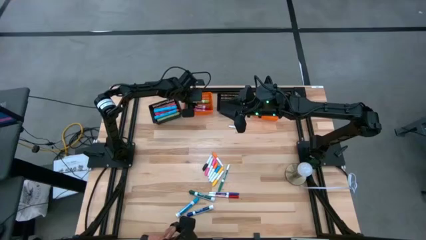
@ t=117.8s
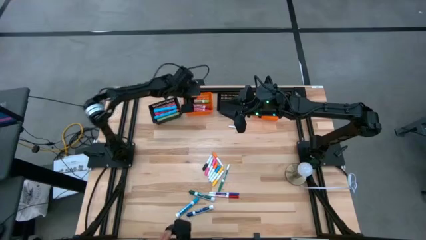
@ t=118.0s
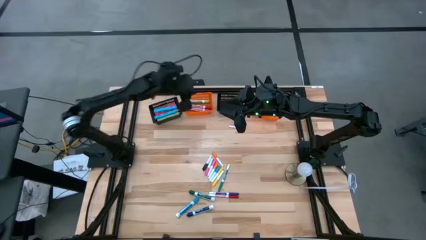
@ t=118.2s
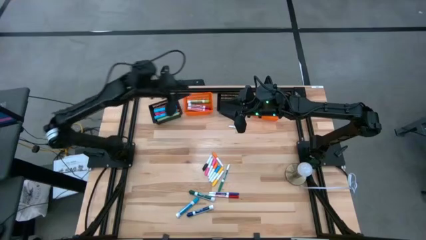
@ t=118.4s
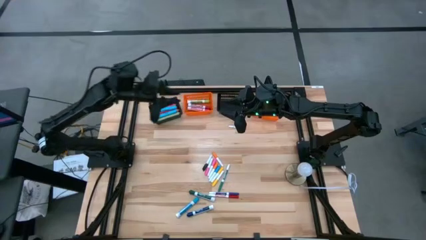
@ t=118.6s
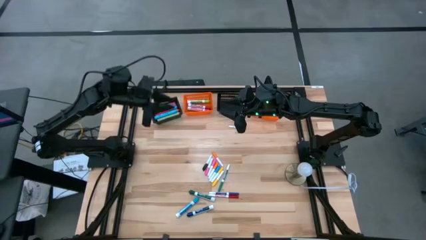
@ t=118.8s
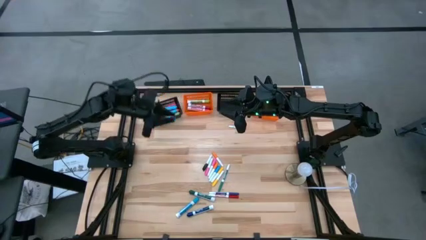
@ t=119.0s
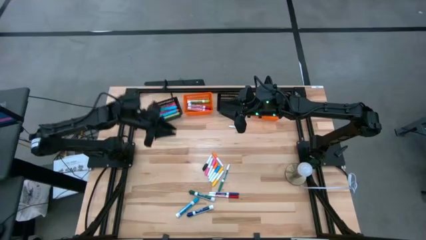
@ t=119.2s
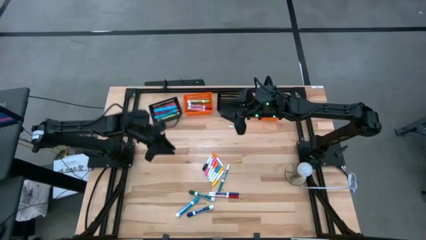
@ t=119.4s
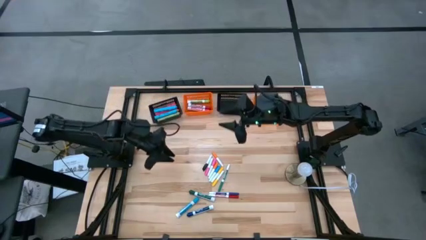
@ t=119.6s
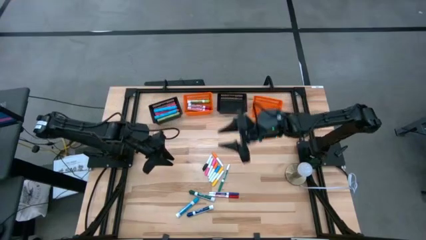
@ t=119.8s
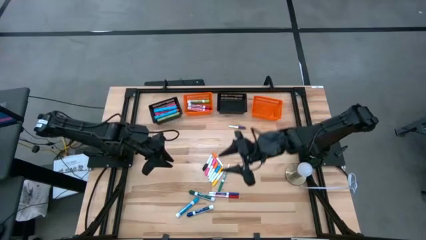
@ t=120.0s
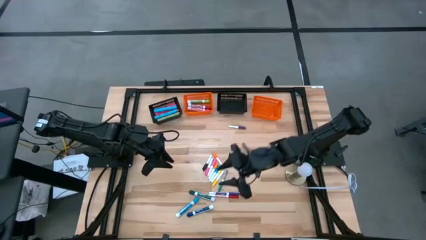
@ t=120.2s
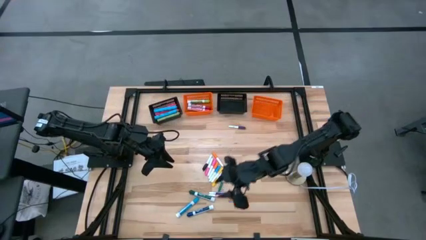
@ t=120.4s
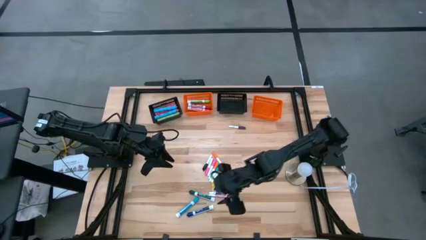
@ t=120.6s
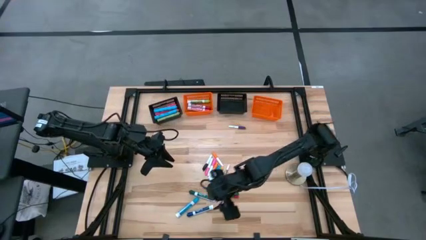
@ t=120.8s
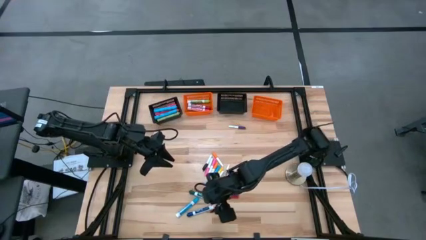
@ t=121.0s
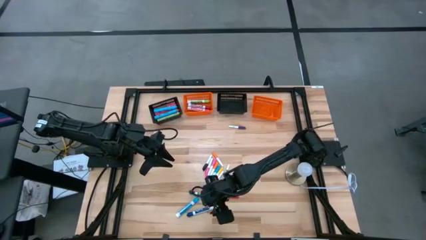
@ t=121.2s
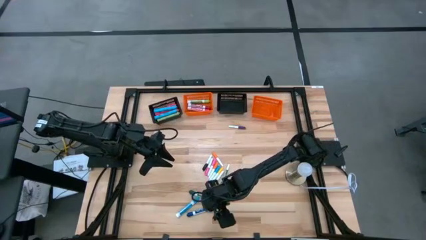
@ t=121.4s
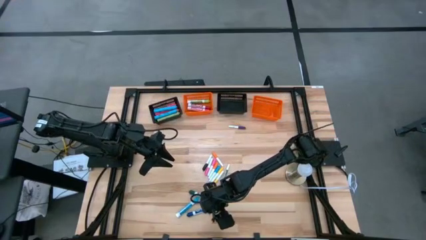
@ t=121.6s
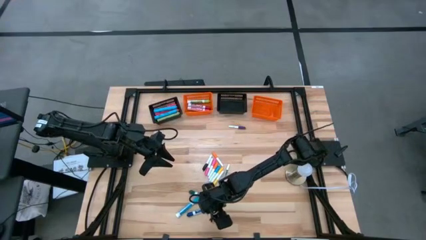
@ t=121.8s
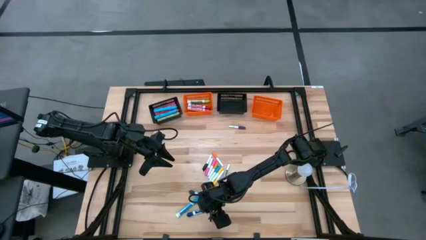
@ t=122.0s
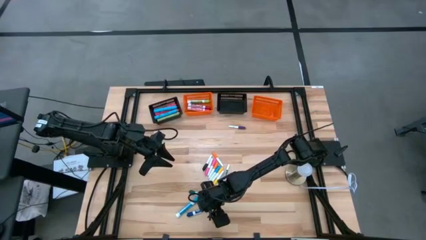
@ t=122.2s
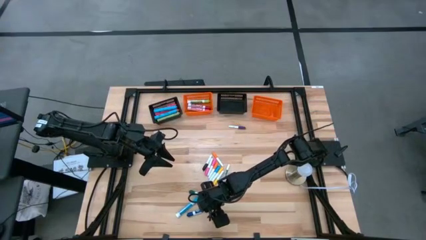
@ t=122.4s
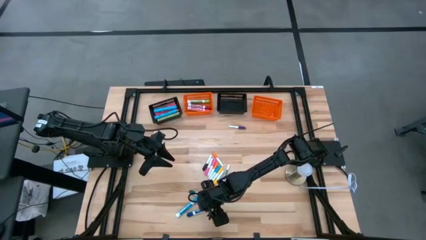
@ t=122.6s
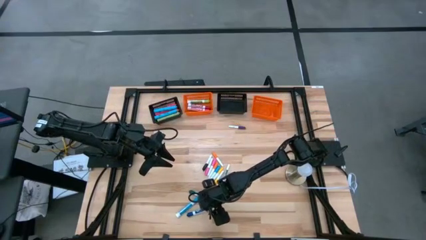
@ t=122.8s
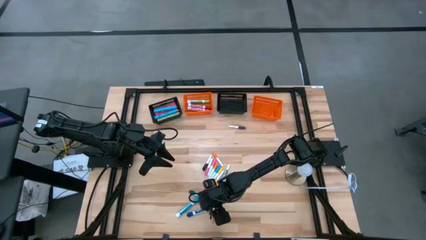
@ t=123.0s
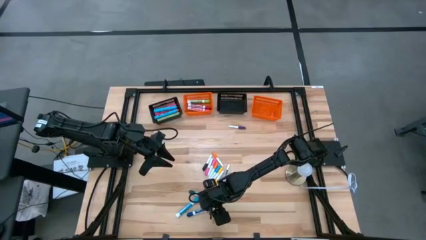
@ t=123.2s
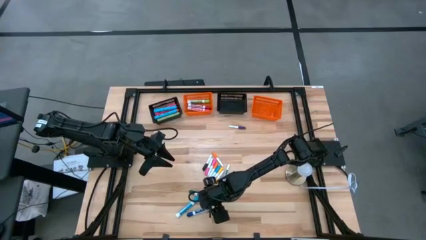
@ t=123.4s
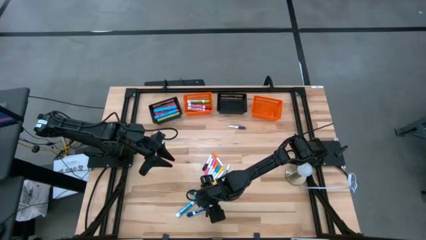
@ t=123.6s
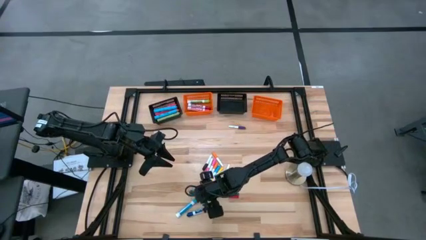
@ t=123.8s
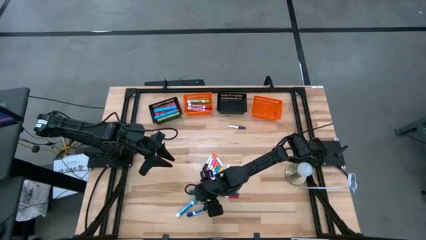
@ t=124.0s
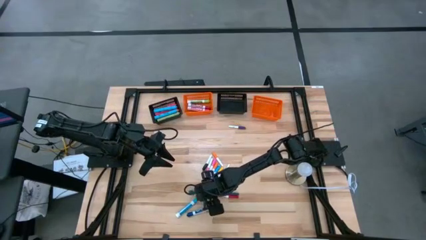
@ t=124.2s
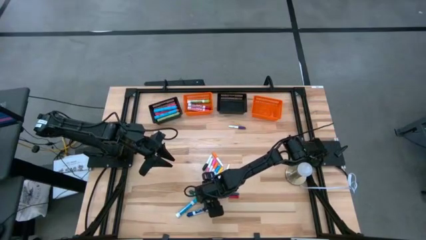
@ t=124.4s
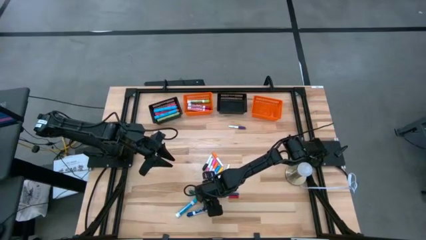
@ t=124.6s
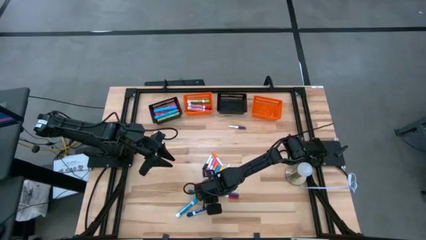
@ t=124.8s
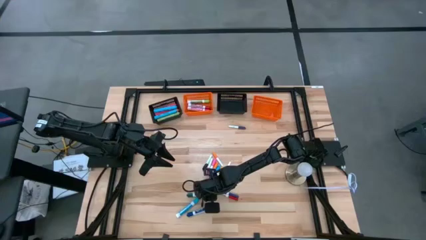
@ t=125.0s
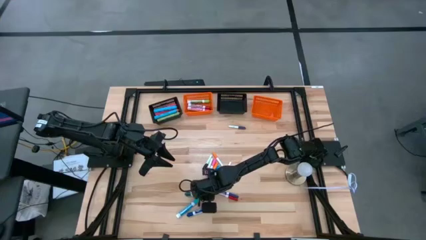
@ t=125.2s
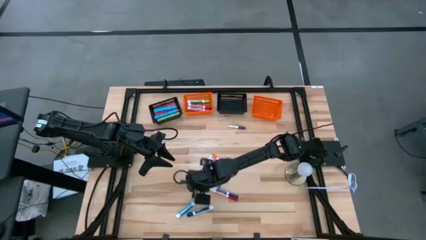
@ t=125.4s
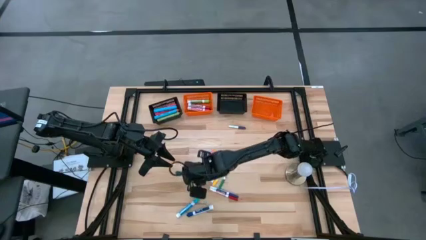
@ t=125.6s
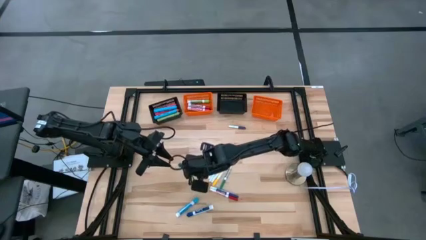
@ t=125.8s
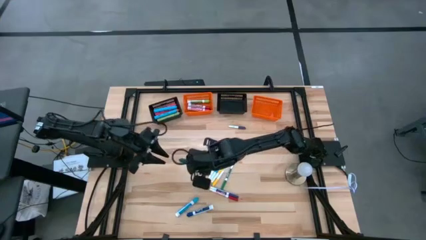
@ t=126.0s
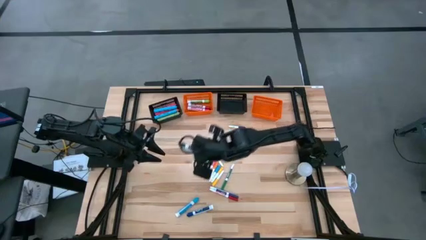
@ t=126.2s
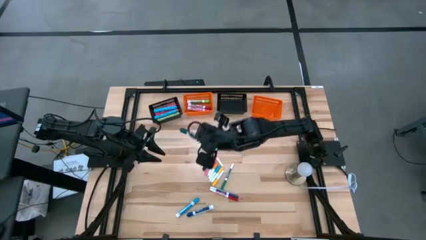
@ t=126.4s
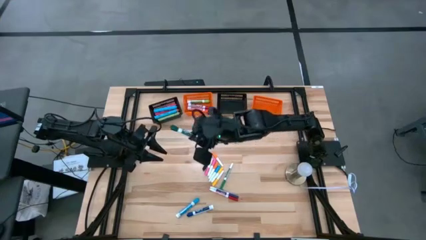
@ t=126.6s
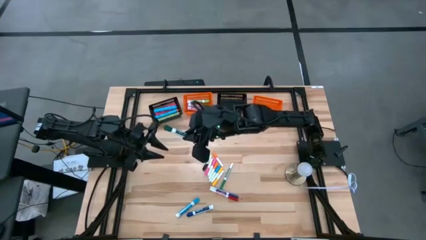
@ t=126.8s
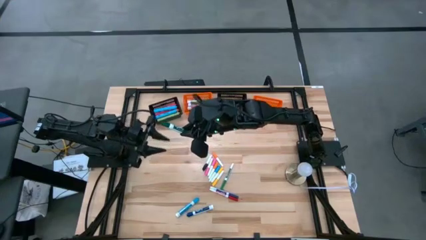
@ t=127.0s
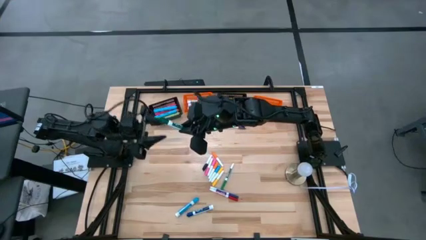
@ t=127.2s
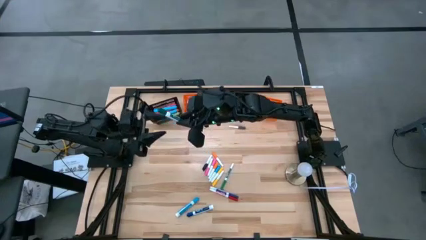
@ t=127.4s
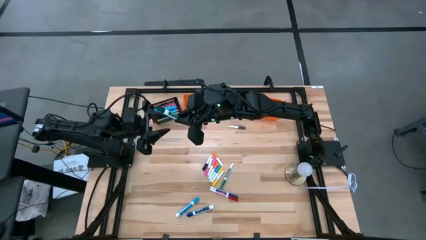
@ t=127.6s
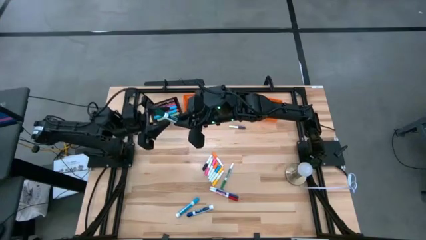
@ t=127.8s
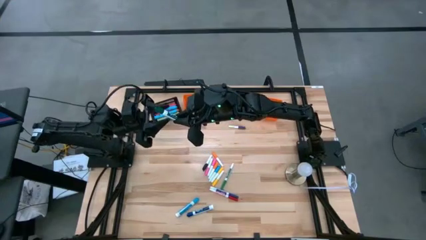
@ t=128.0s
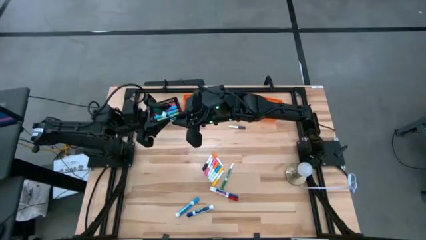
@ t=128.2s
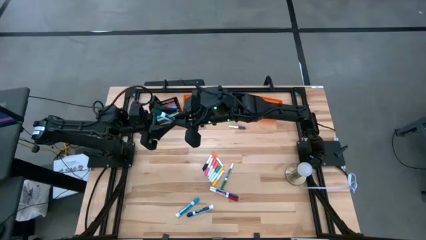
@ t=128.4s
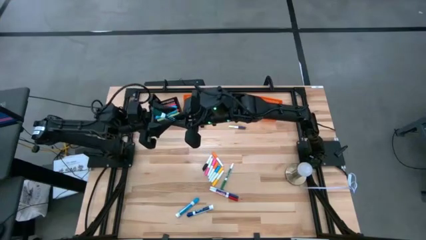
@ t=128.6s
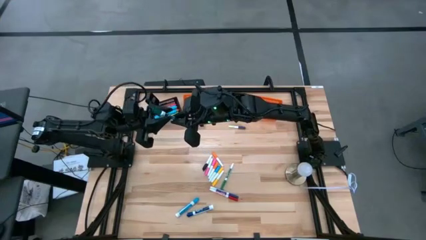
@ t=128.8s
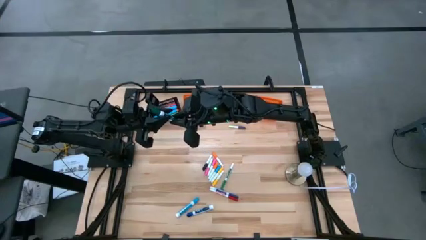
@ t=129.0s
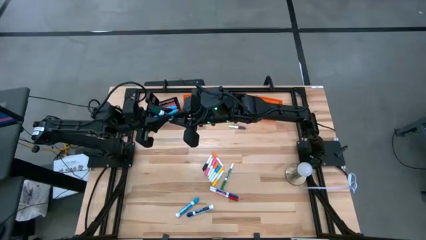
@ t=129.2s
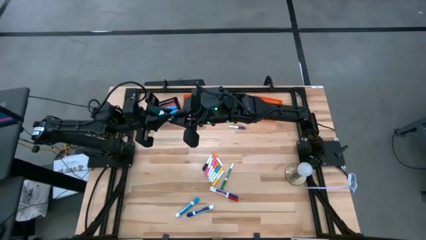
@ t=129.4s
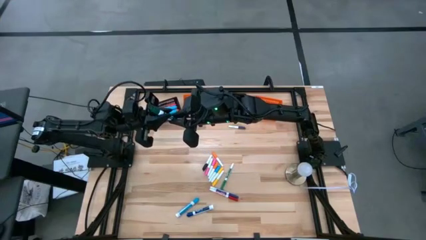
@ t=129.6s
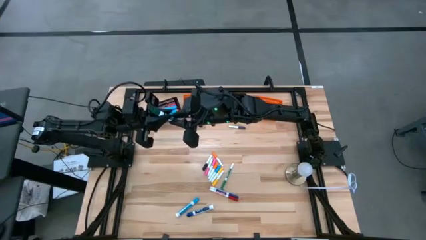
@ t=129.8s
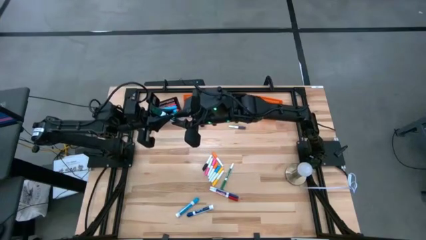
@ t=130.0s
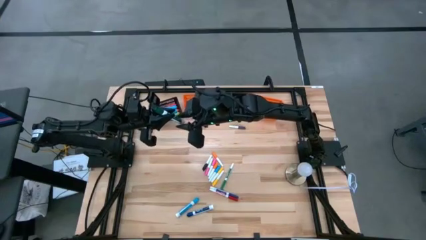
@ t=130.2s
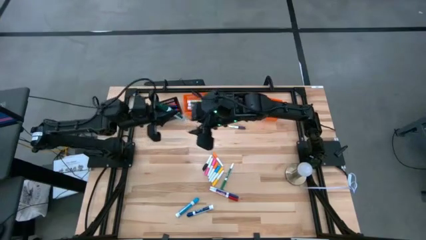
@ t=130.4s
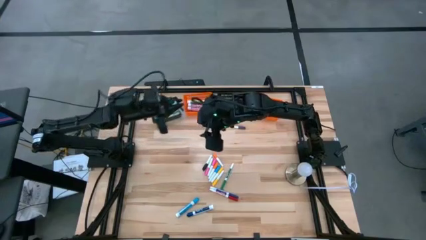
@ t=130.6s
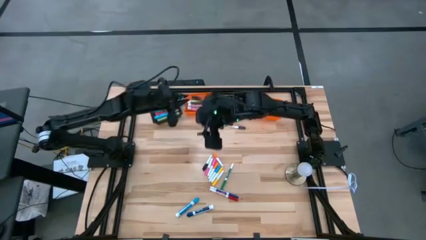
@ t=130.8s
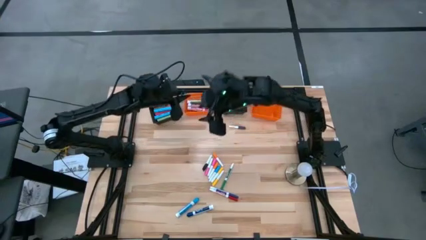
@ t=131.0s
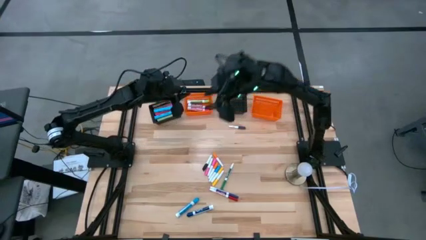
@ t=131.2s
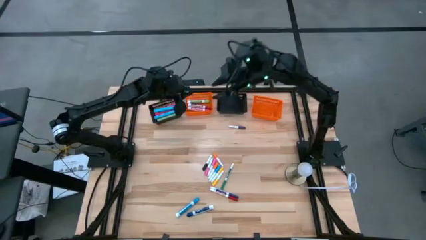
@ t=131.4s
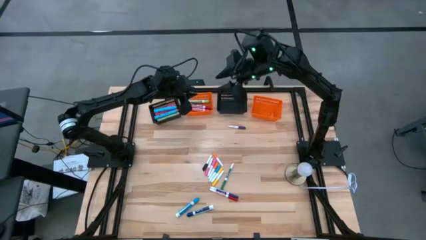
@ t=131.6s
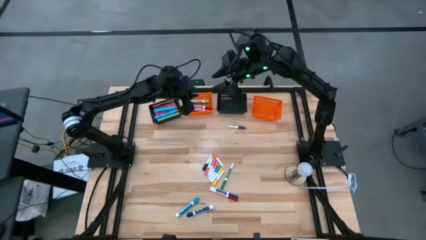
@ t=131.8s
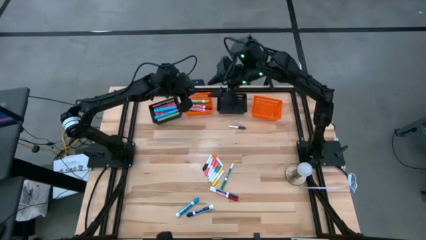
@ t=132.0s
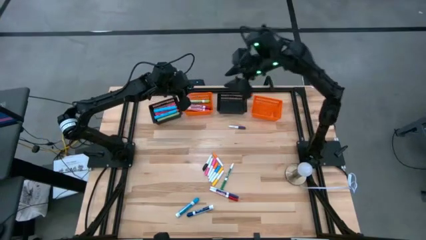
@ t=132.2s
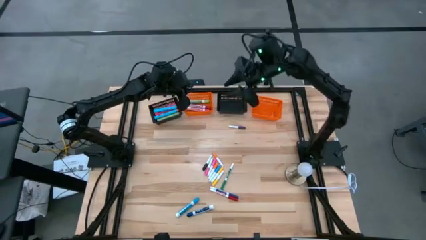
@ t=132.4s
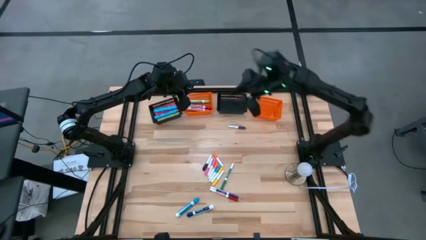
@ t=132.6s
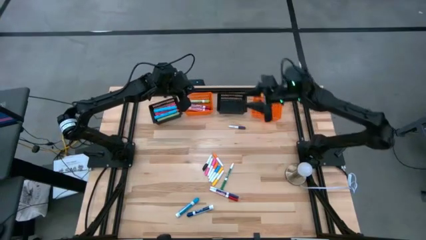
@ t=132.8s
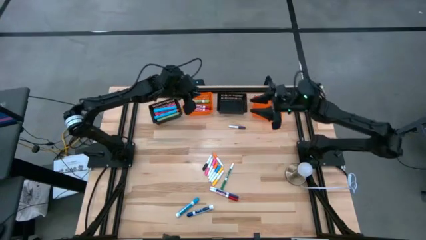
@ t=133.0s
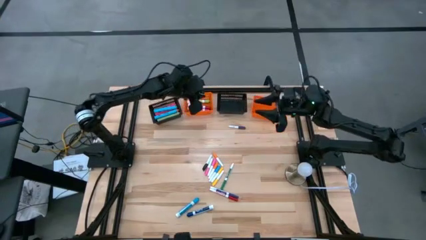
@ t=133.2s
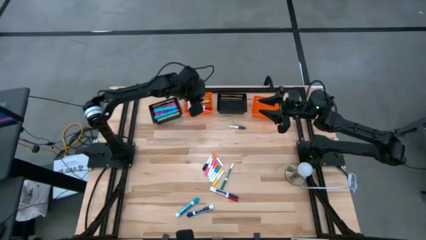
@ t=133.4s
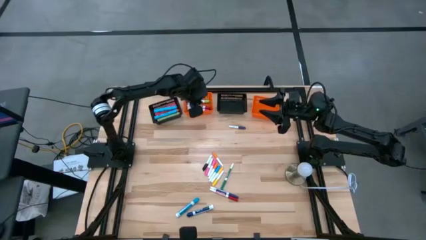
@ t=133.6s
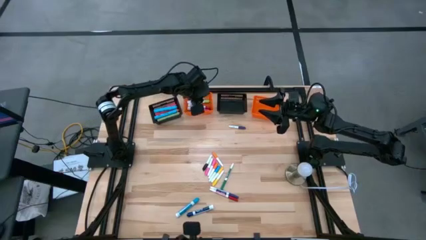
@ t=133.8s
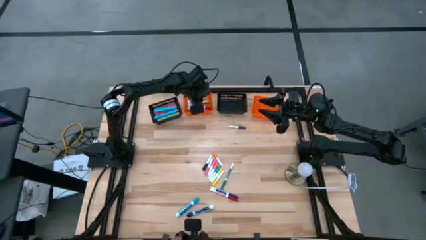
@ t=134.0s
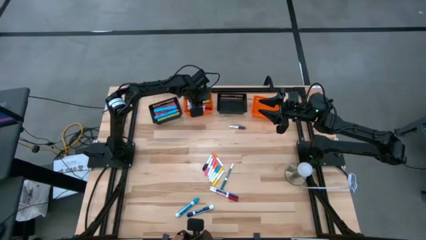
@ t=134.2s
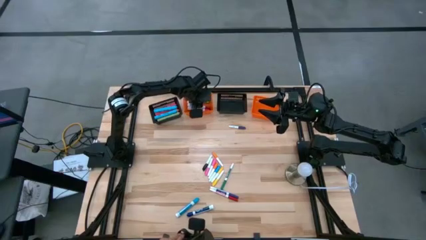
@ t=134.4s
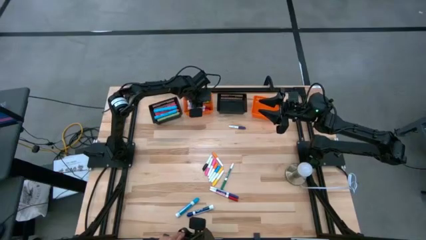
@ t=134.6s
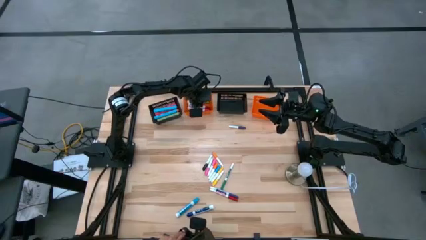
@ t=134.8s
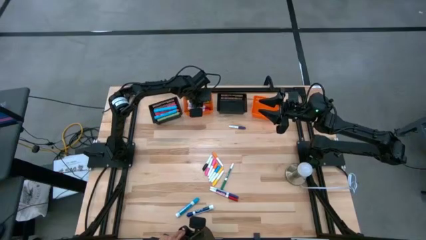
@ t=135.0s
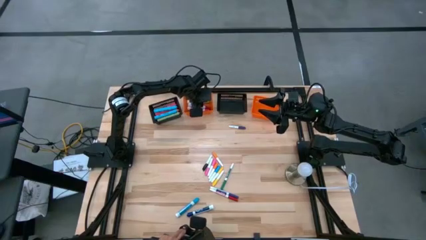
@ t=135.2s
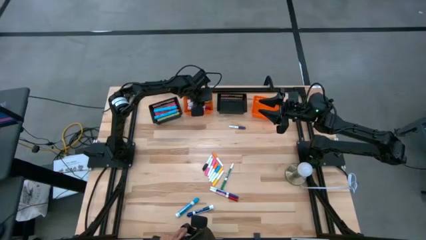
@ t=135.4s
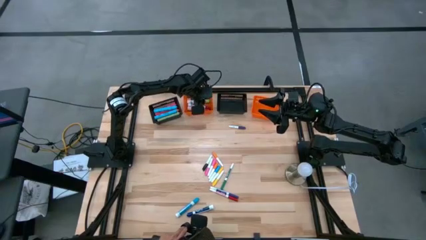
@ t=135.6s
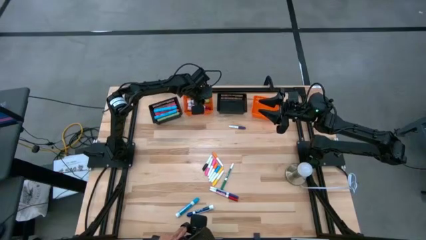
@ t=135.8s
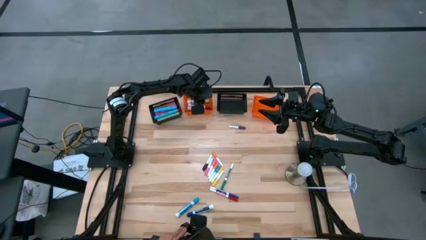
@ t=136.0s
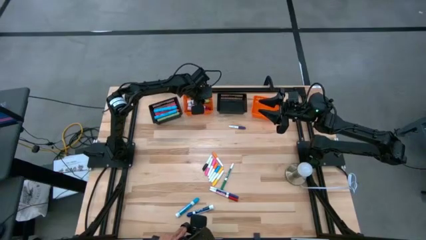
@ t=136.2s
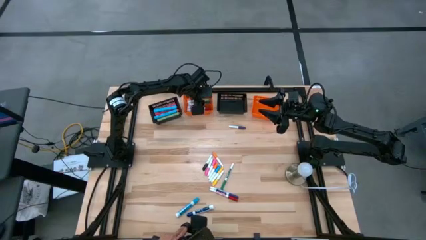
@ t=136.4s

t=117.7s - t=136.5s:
Task: Pick & Place Markers
Put the green marker pen into the left orange bin
